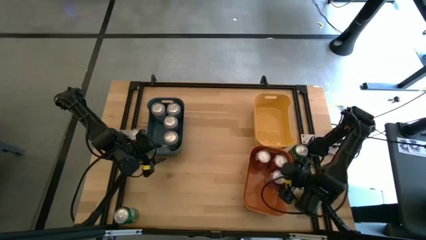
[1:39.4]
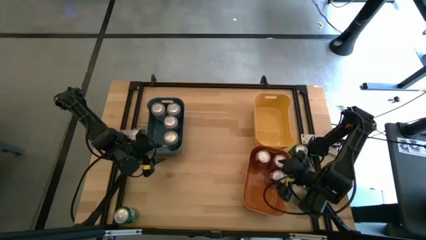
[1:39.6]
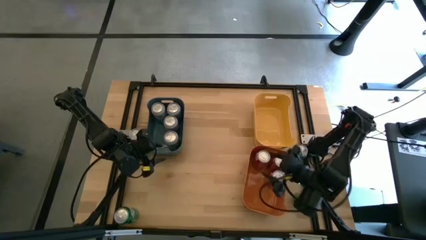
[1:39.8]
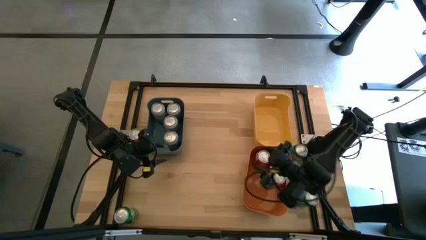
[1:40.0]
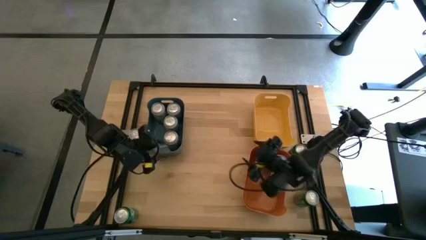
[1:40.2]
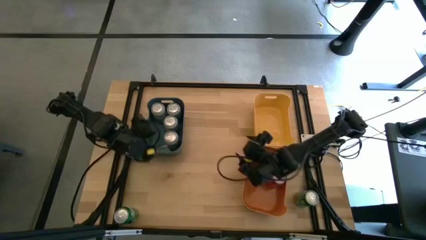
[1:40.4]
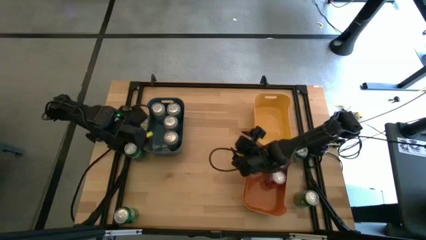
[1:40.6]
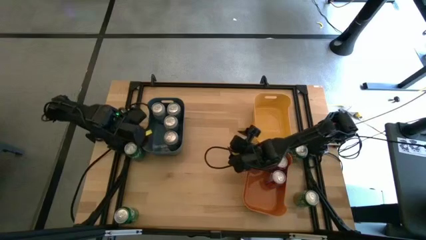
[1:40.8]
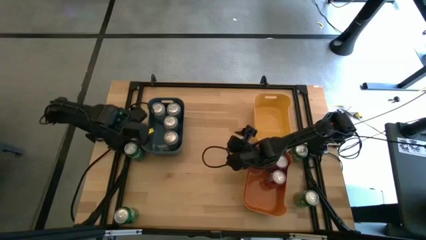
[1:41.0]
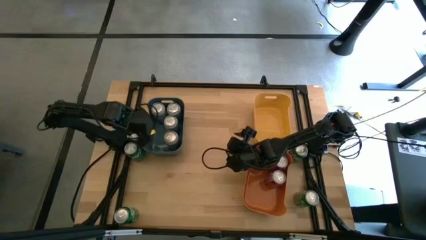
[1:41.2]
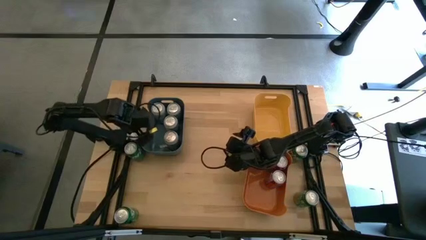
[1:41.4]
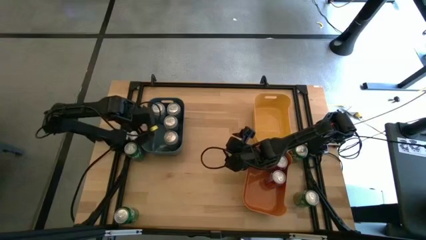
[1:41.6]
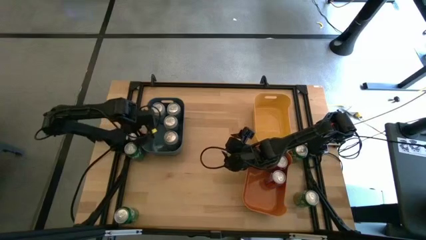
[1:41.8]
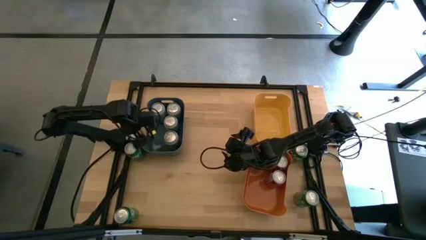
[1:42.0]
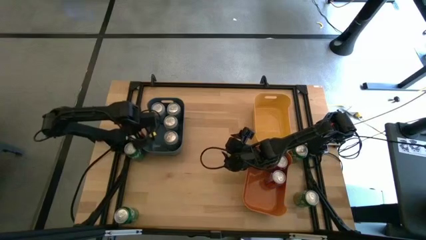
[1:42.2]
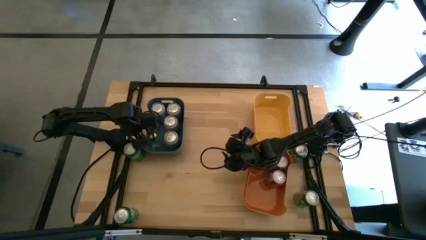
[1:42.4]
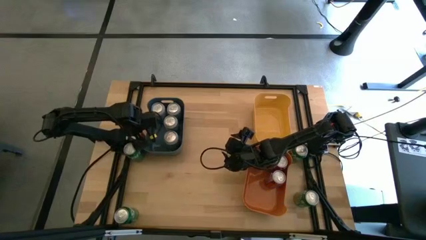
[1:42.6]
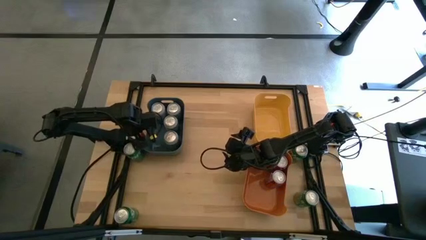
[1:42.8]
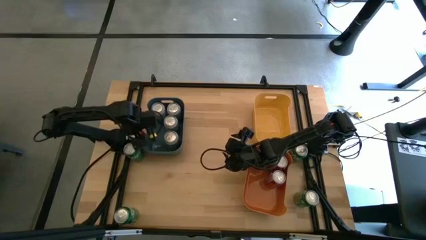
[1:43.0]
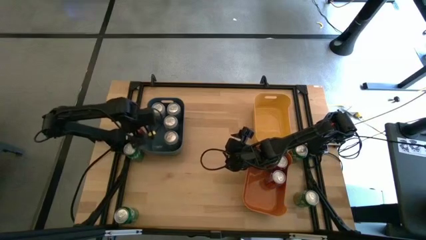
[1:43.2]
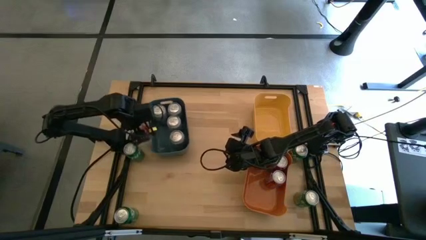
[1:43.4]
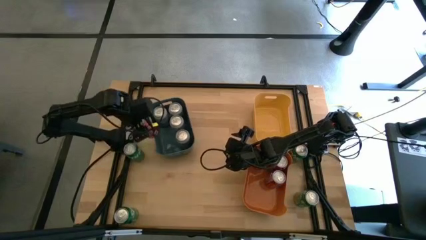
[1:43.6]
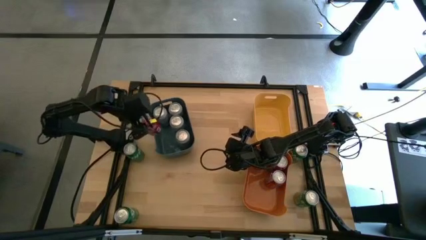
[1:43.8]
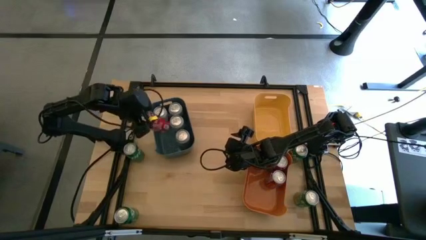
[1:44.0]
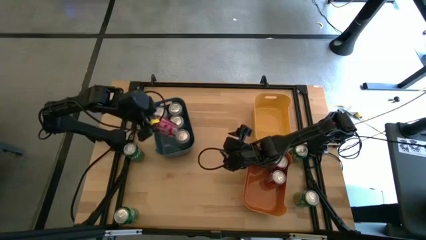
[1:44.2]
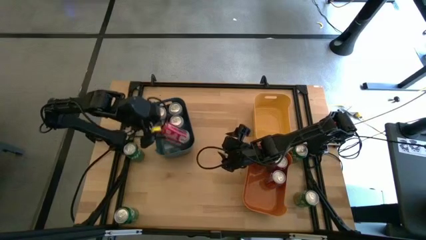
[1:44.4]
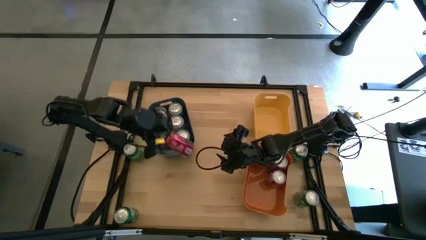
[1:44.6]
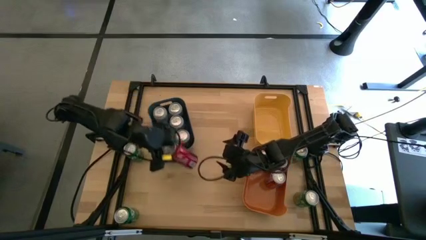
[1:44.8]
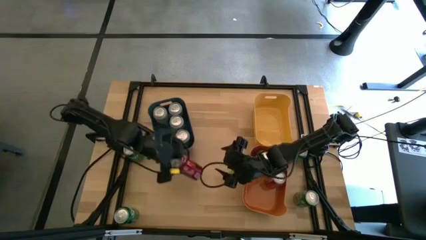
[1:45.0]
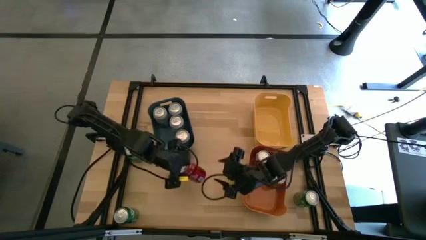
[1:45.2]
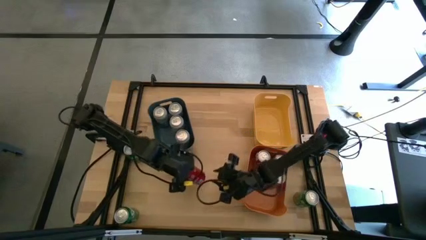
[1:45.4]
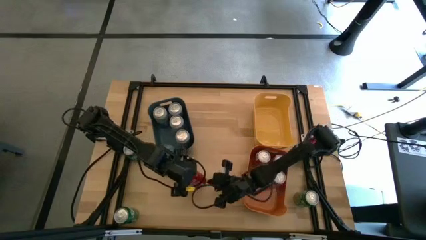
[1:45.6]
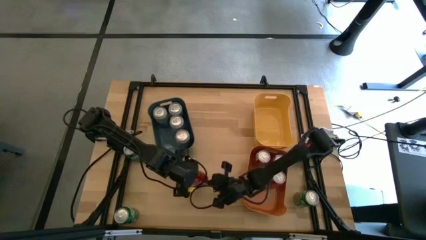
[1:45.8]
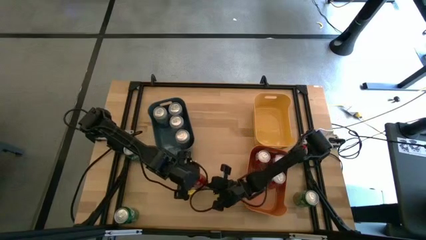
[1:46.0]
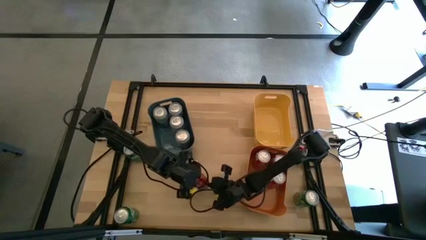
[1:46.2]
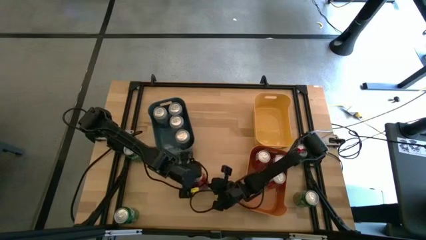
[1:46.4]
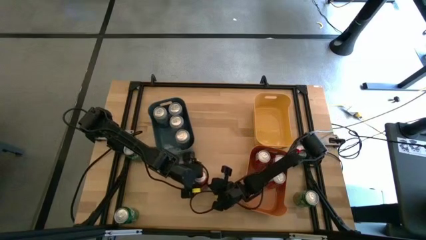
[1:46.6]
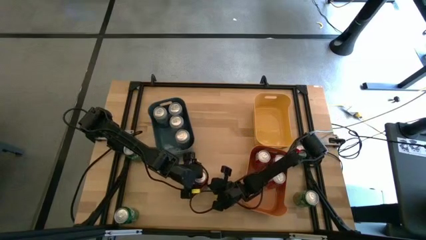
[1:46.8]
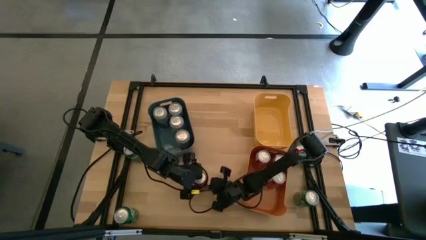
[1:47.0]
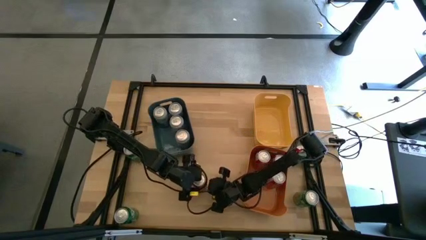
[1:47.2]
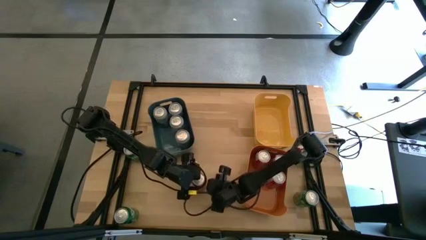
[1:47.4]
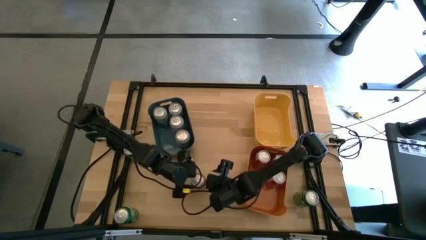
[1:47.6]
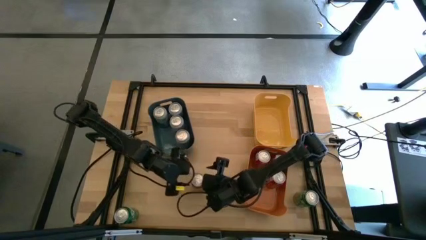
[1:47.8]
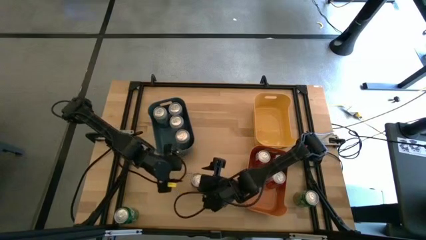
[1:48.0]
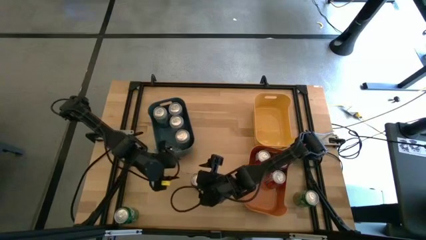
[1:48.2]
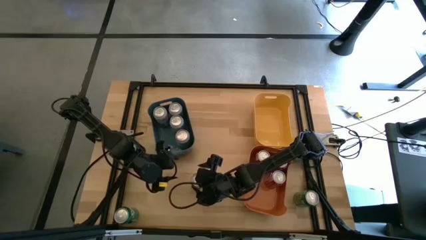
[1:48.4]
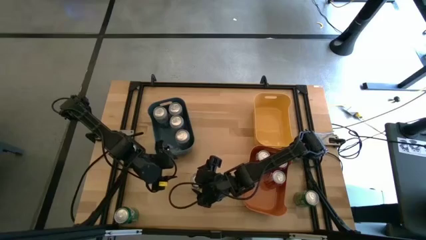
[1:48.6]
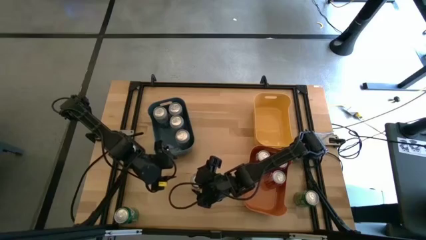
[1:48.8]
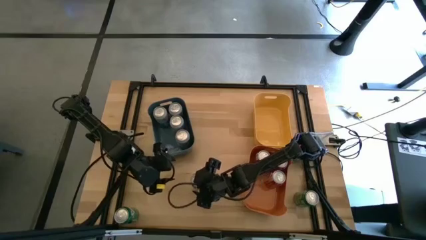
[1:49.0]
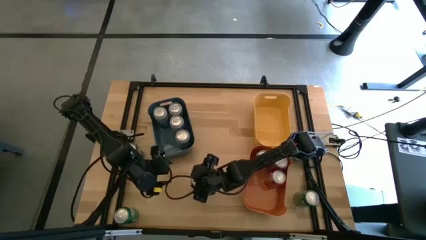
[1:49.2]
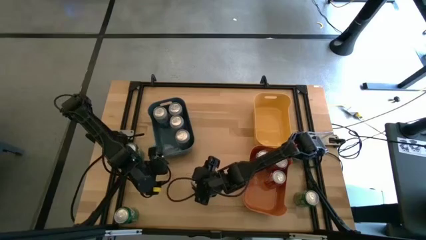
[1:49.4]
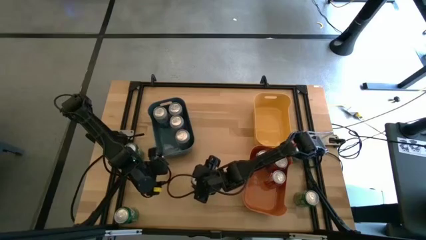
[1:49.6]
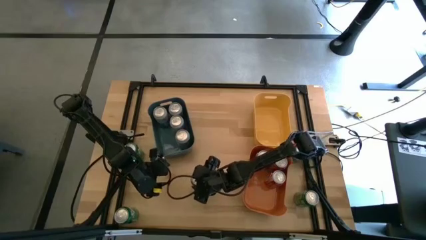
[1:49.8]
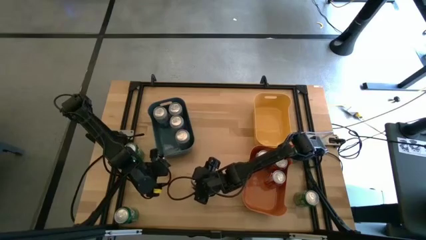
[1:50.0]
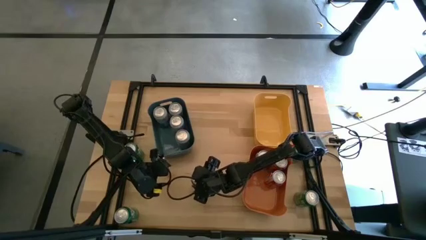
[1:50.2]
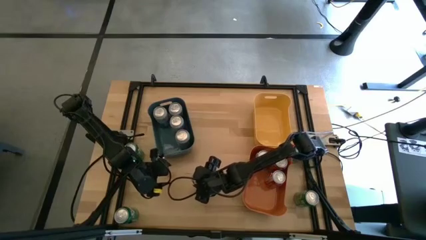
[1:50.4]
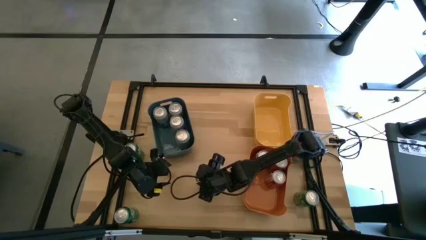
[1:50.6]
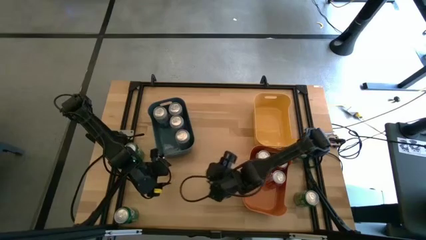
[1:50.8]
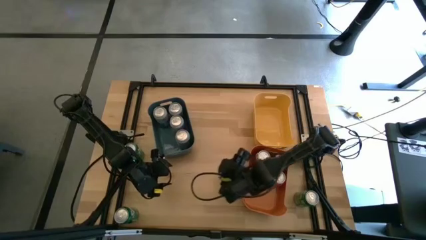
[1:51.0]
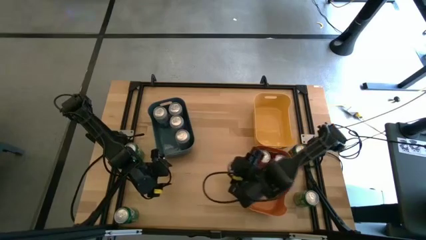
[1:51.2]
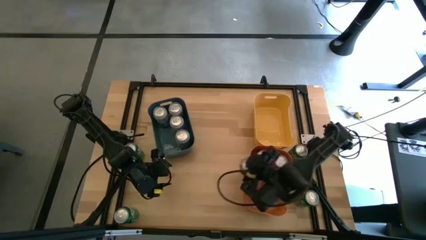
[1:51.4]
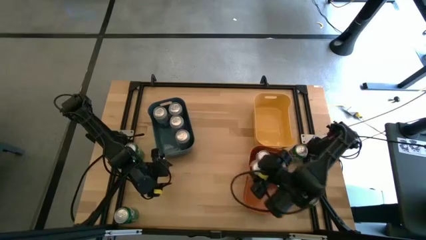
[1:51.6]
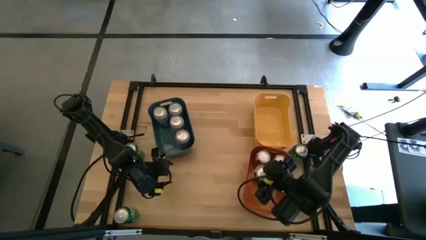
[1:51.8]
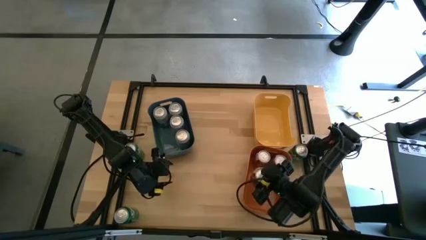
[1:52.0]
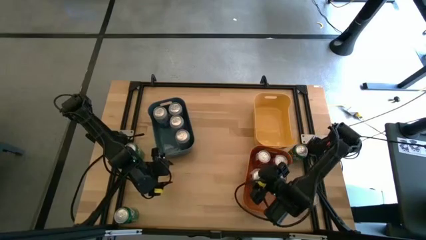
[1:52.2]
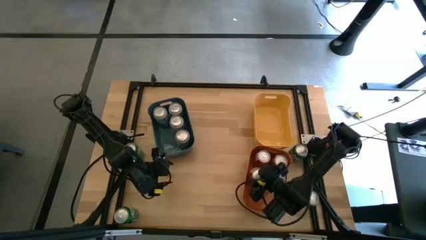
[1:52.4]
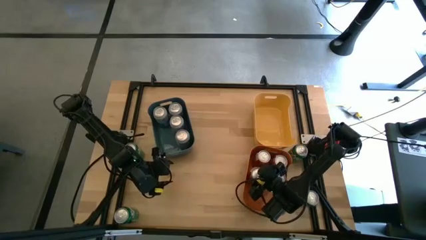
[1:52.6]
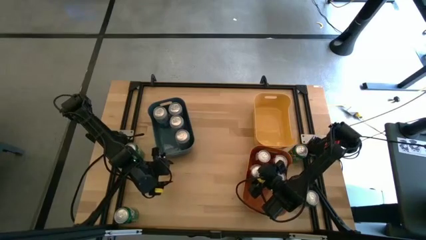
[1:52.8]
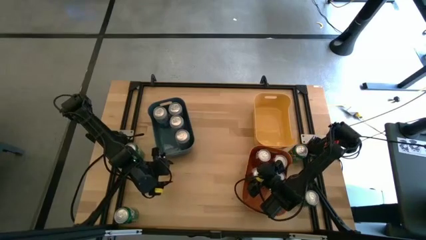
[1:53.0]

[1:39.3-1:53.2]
Task: Sort soda cans
Put the red soda can into the orange bin

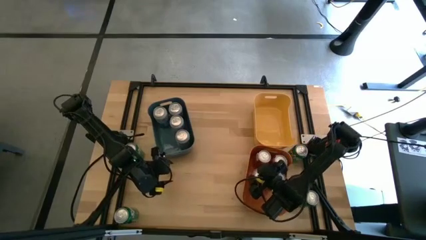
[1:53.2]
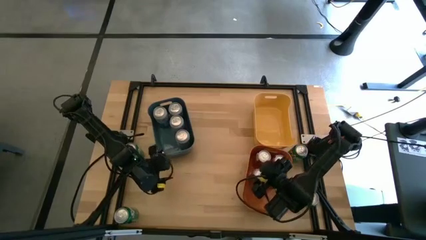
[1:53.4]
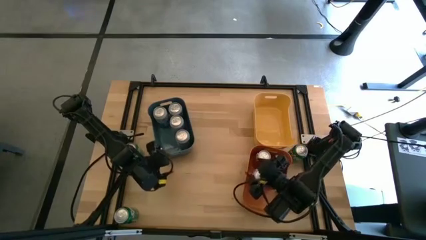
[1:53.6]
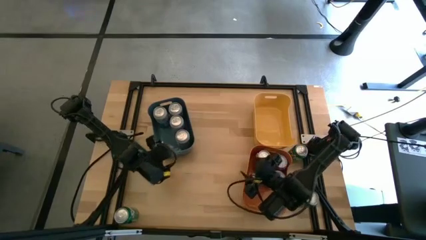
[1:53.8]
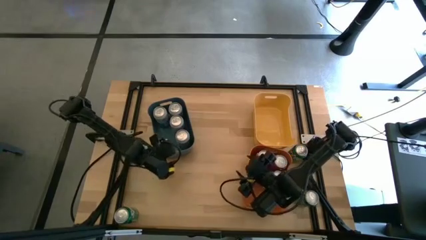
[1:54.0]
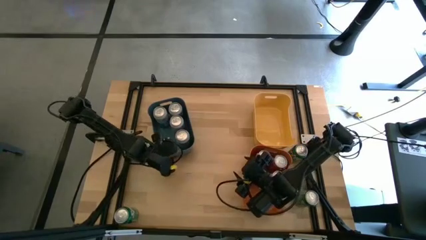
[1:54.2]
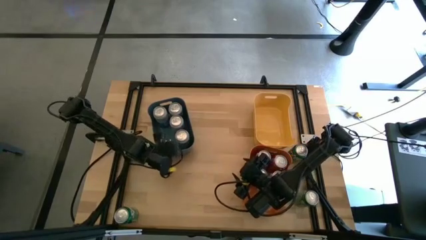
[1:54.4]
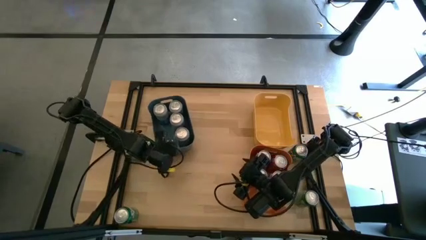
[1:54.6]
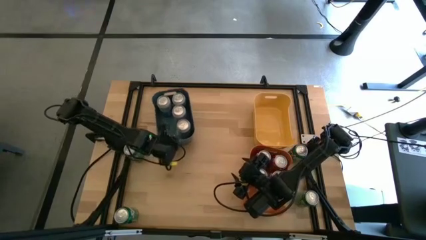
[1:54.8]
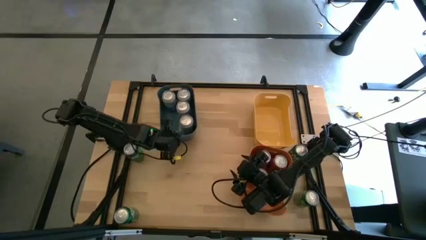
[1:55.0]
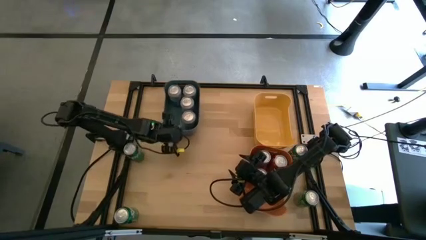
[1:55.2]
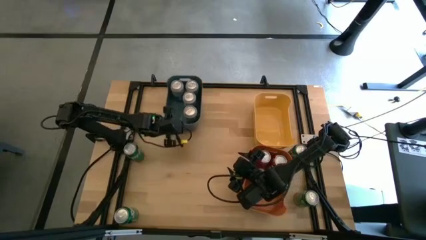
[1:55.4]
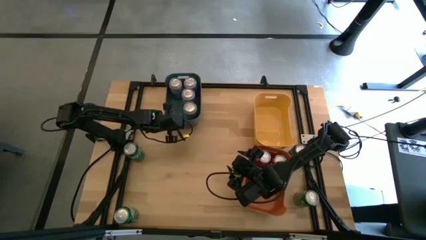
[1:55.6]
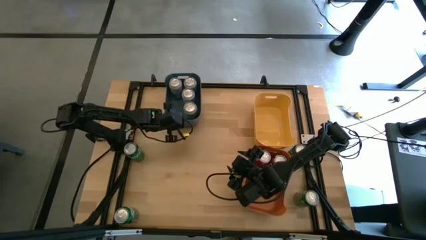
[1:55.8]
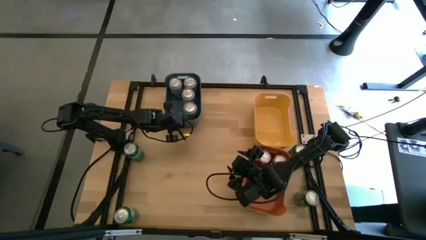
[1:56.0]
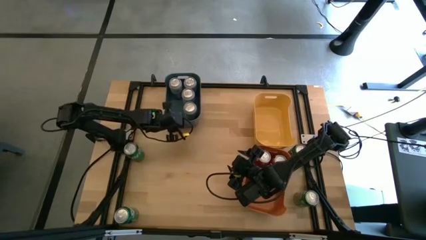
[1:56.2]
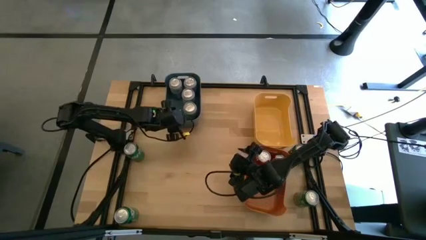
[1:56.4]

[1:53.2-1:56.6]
Move the blue bin to the top
